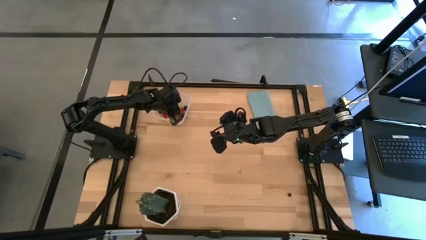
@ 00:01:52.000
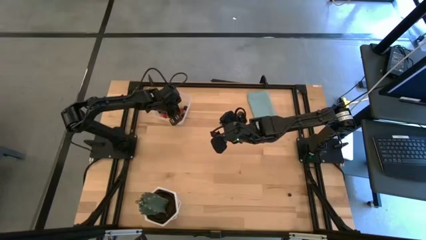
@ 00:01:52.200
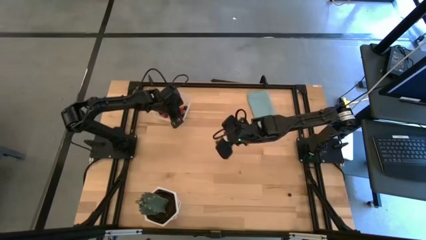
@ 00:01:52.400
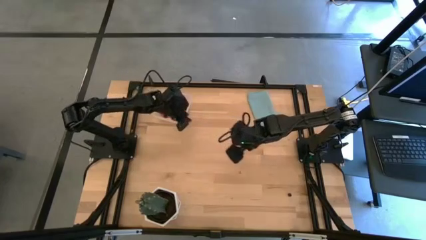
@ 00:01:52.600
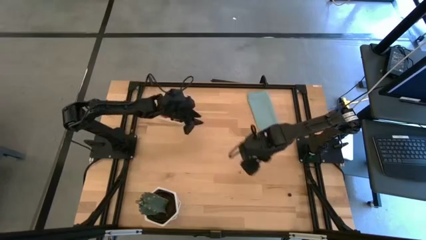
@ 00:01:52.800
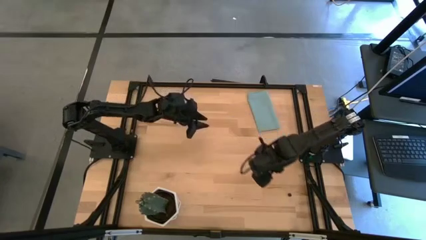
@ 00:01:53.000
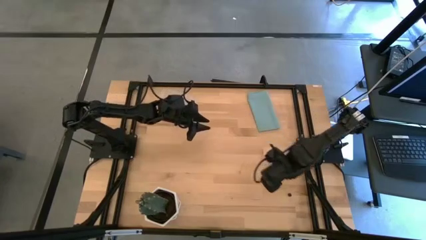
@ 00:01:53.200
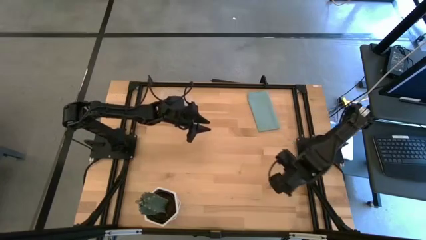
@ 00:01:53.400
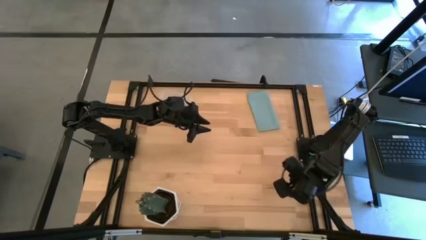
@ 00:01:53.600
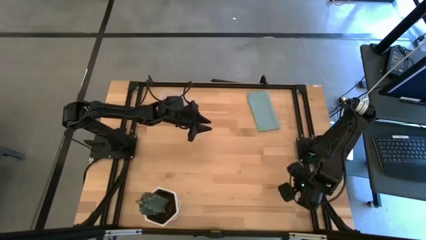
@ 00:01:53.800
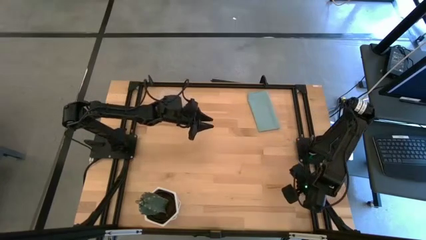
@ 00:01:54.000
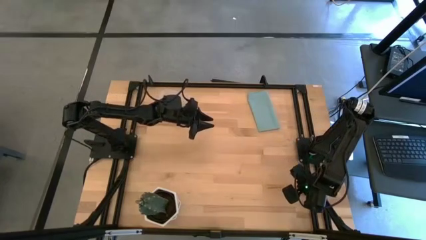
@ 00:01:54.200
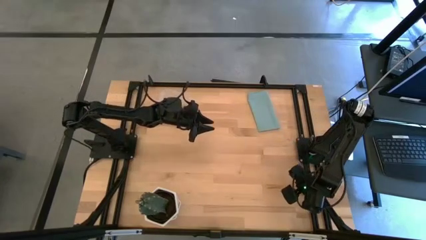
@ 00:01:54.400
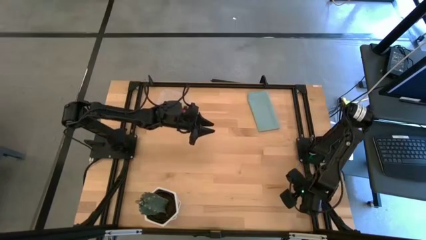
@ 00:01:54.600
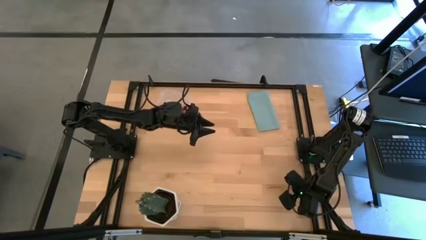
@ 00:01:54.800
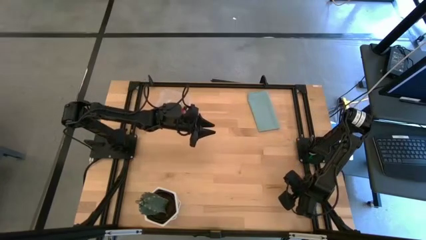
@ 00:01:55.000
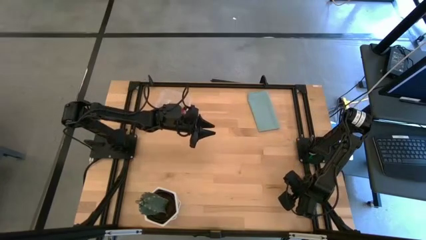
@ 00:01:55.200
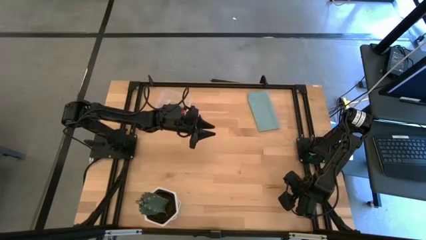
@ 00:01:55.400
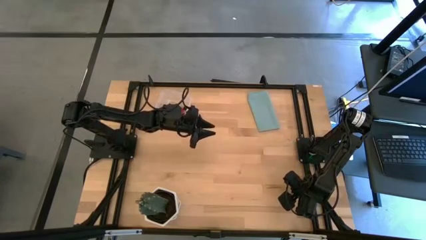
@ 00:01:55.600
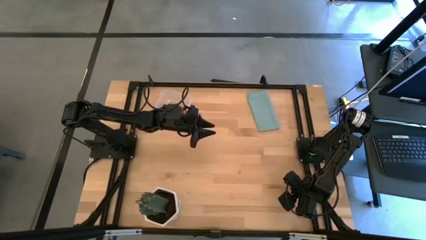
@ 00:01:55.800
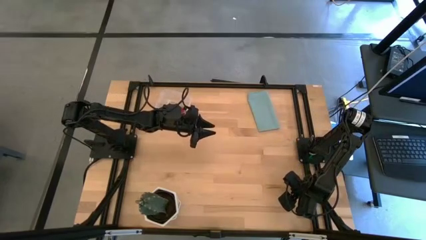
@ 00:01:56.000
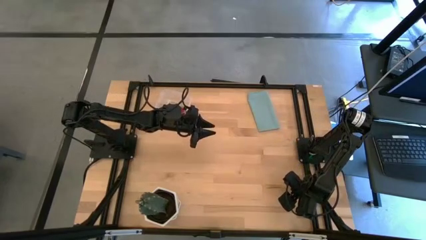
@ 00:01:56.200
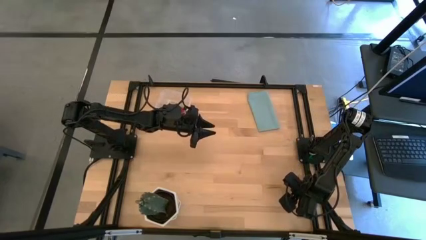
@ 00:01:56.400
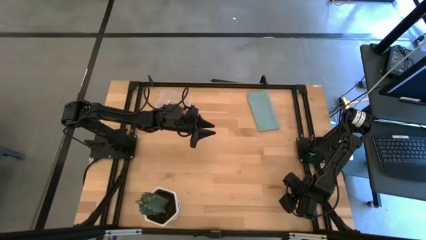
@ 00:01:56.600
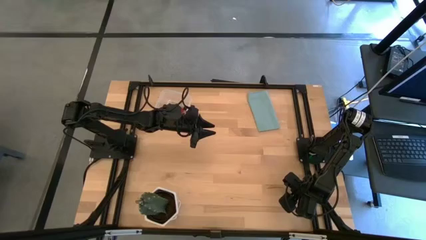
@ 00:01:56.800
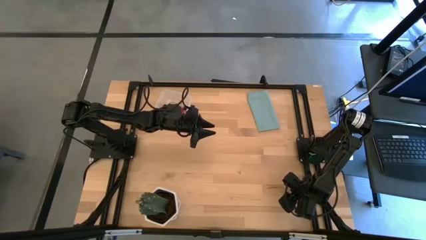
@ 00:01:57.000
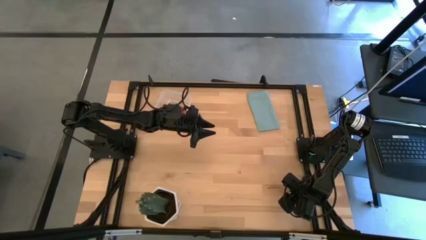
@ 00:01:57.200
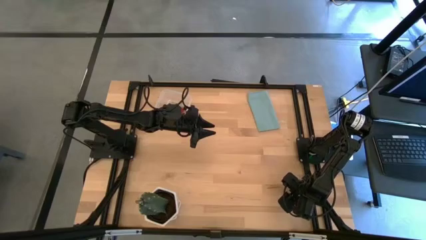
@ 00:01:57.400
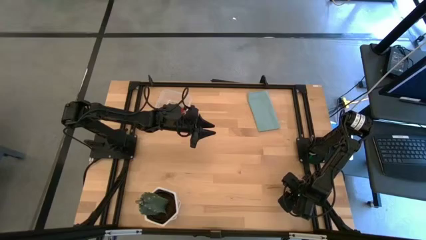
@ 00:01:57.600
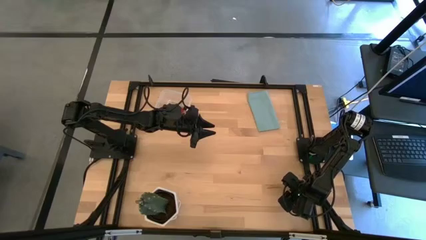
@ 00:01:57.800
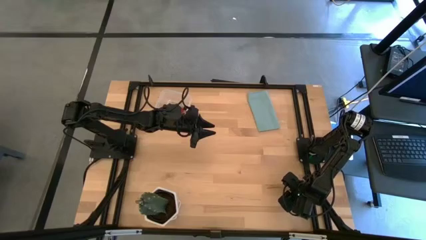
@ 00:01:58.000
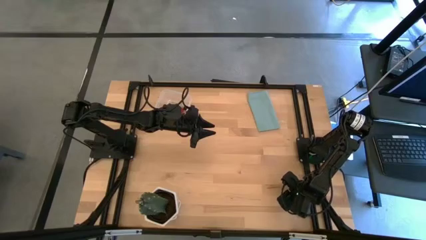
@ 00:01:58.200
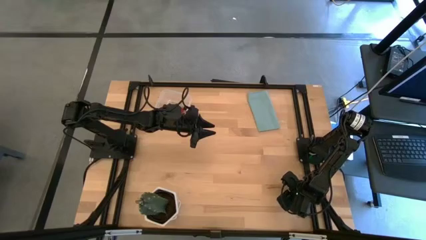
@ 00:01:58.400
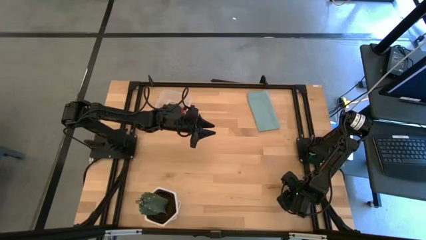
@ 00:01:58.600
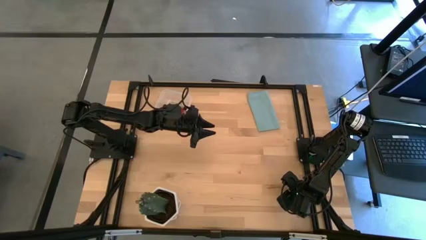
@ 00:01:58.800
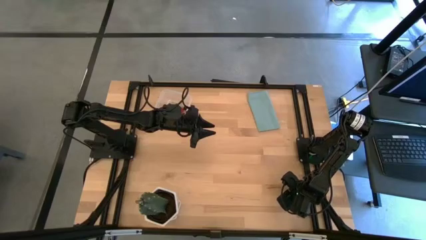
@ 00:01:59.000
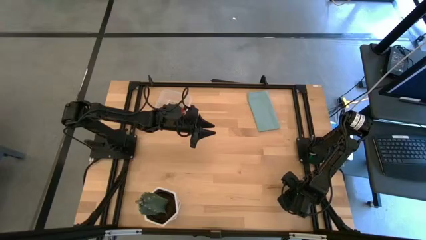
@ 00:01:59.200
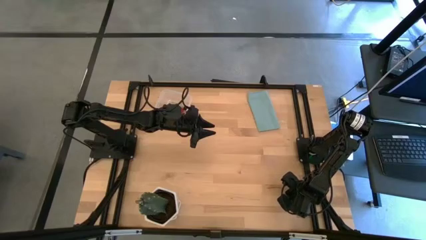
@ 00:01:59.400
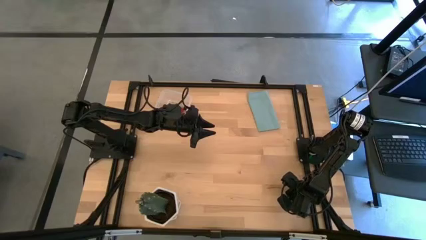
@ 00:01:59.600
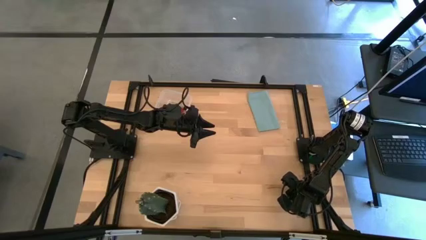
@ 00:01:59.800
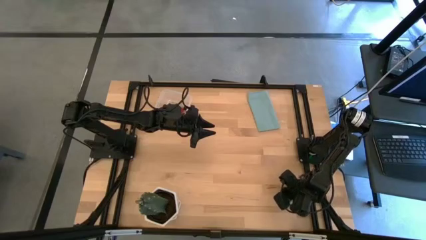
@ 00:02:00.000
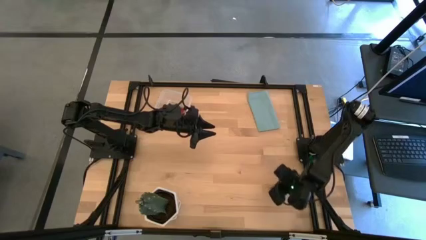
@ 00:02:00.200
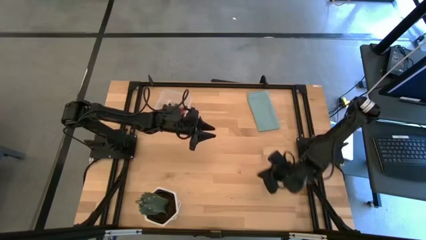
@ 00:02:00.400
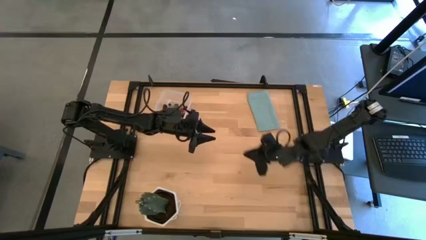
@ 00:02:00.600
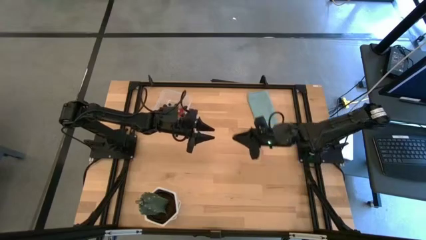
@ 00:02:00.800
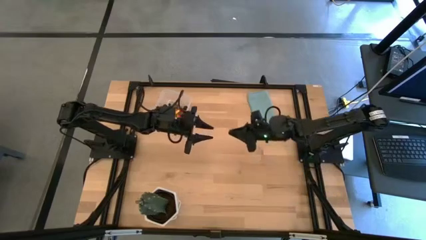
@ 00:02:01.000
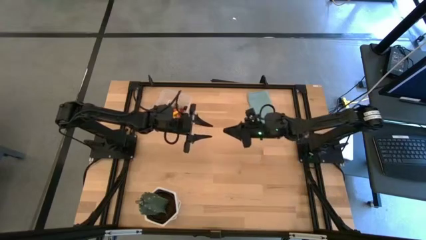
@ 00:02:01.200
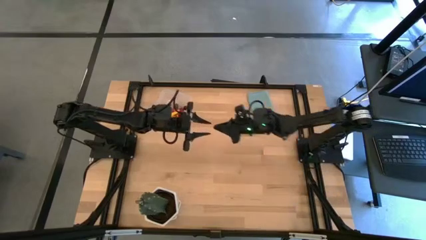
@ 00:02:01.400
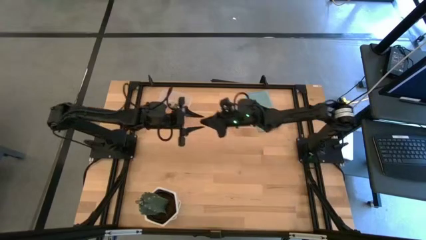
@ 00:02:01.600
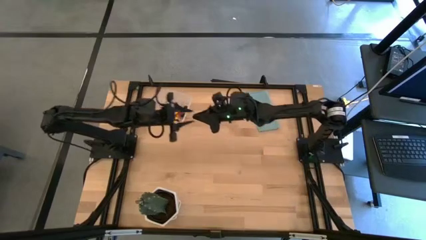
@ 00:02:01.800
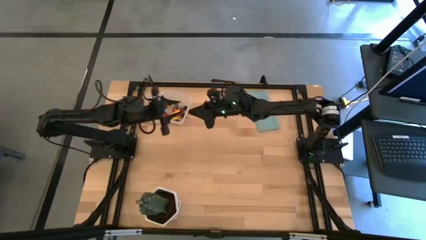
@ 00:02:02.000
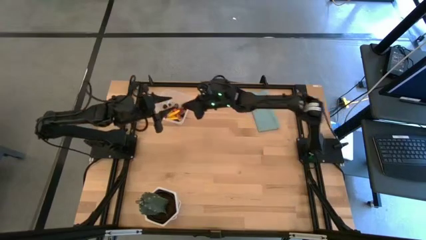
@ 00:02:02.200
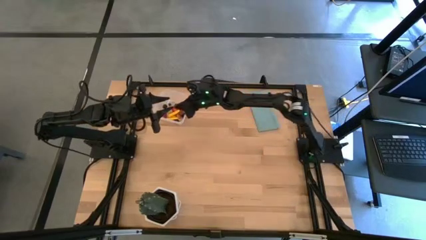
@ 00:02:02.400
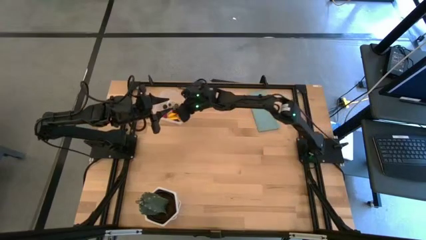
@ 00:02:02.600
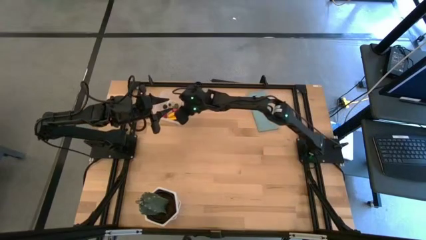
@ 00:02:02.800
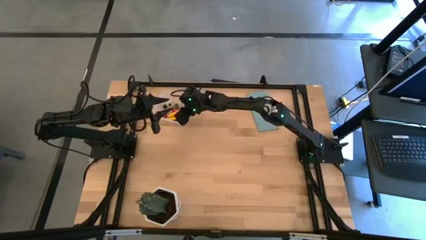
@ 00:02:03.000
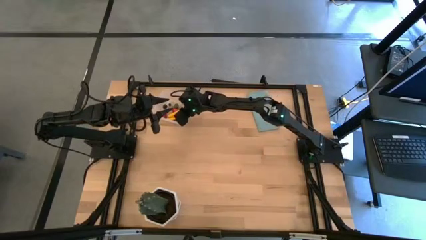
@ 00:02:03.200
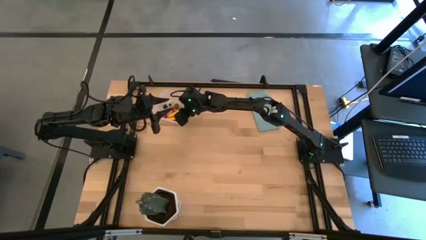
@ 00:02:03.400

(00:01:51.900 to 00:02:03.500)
Task: Pick and placing Produce into tupperware
Put the blueberry into the transparent bin

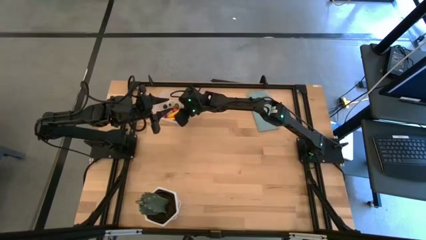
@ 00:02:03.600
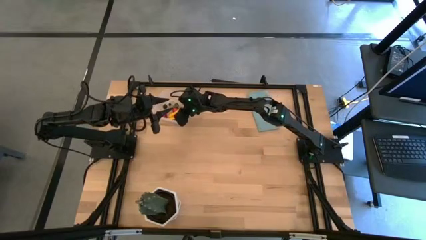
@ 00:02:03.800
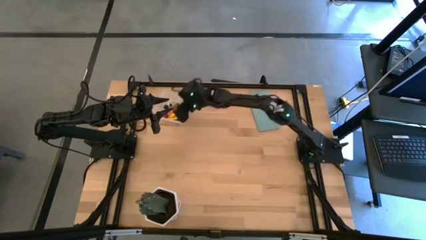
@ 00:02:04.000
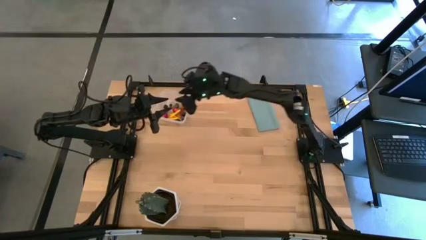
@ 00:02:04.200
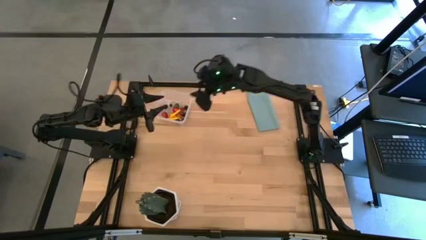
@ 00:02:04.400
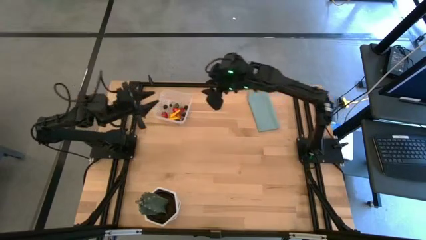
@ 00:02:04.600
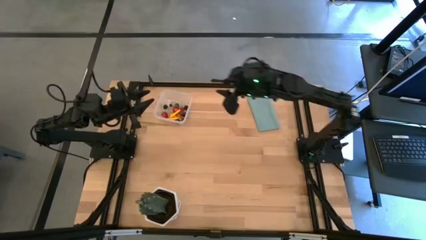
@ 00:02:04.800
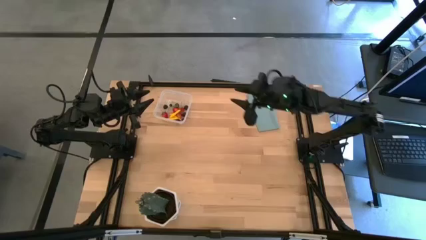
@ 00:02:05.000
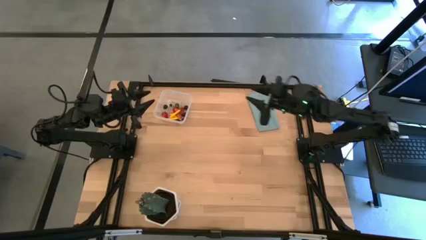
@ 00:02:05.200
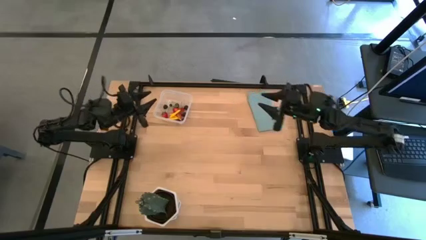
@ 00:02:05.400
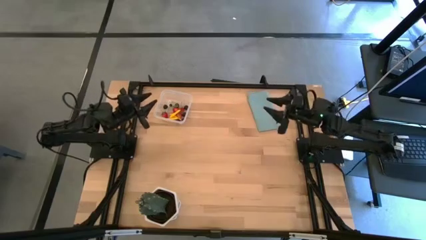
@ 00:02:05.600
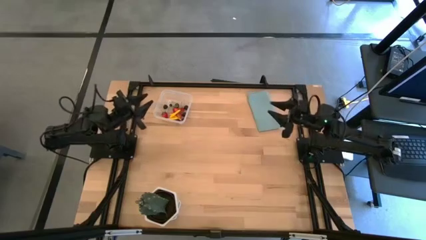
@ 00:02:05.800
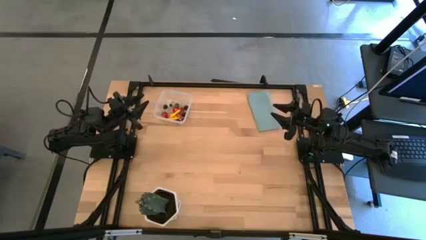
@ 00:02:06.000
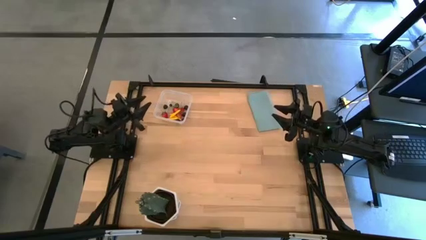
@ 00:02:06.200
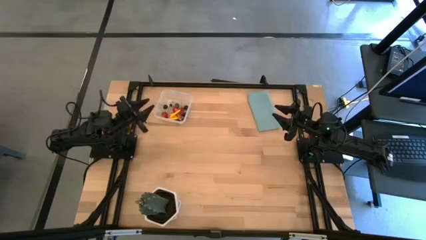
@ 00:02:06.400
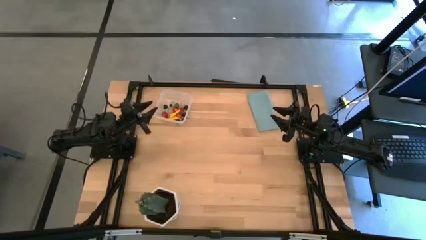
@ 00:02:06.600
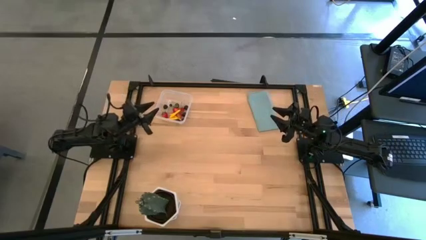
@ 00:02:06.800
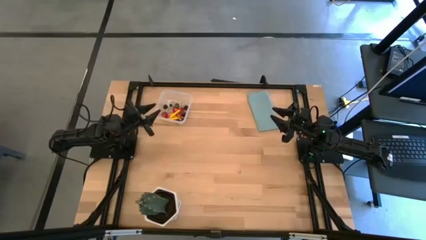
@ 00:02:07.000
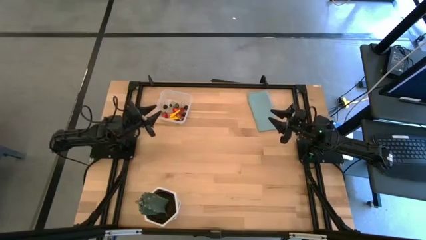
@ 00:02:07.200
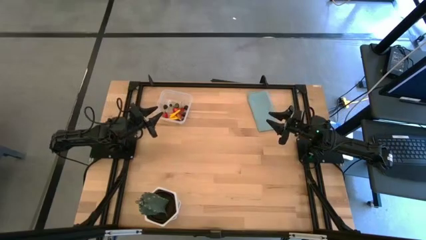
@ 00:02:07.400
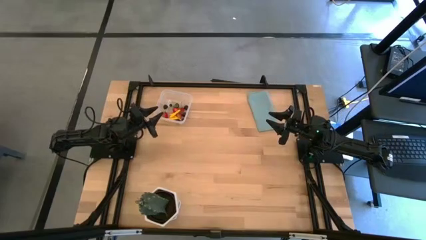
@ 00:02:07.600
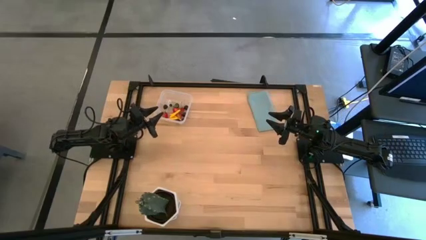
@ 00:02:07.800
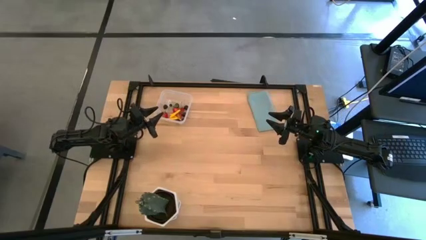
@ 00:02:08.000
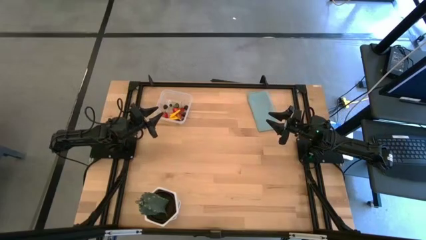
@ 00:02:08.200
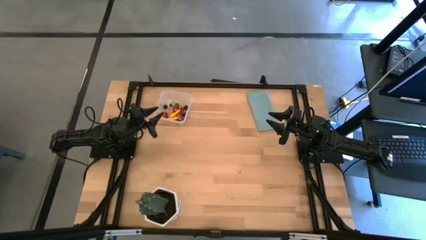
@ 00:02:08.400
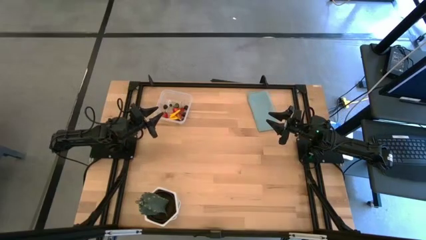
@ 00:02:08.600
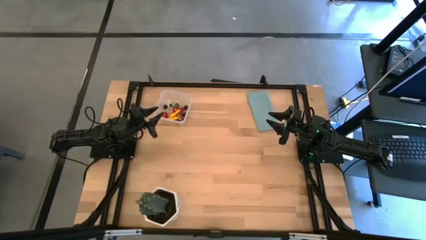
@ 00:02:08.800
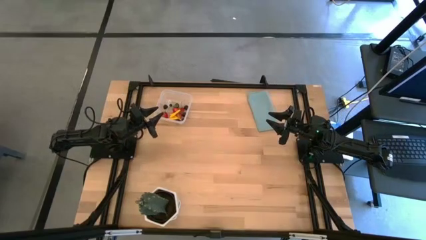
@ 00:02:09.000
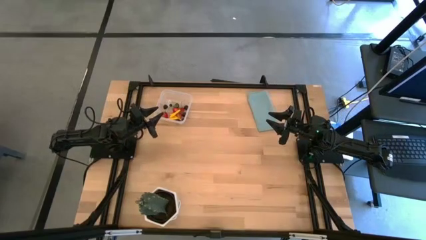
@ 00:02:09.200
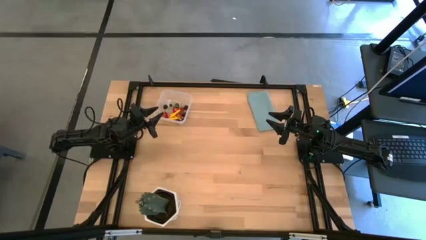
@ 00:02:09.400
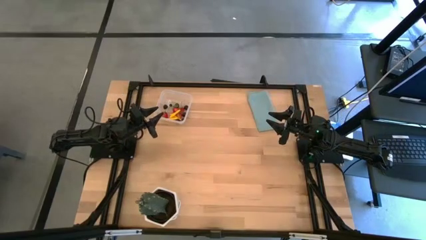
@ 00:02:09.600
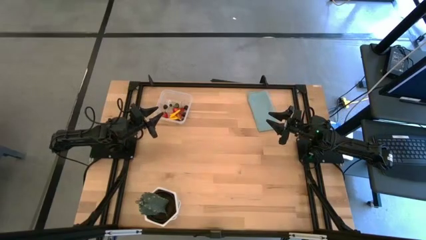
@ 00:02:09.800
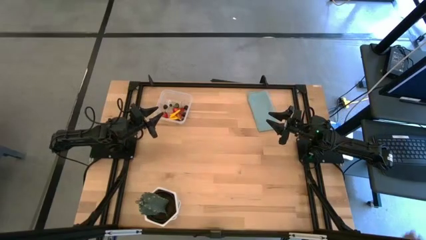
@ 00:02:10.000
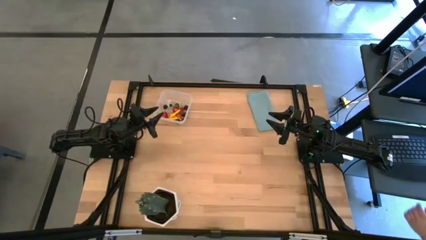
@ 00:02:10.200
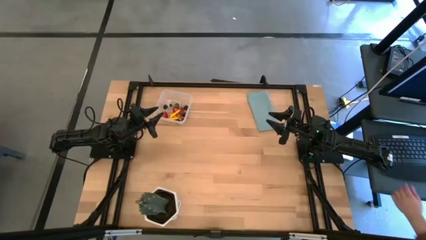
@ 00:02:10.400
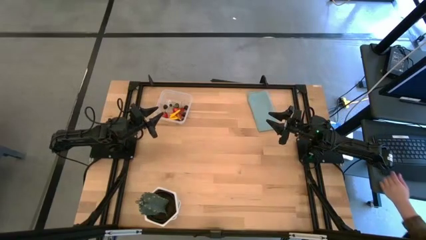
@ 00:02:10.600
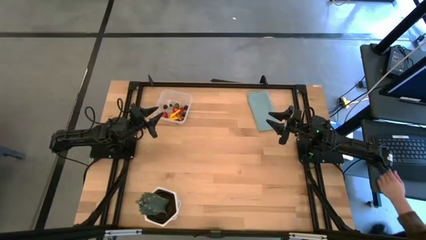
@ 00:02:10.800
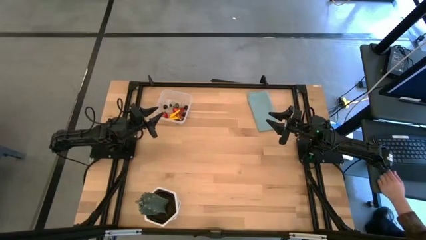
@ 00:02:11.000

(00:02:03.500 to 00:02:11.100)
Return to Home Position
